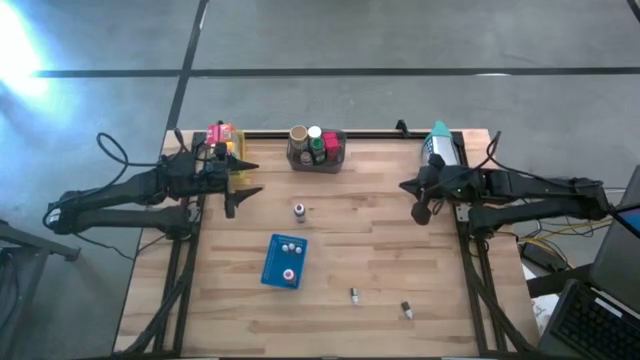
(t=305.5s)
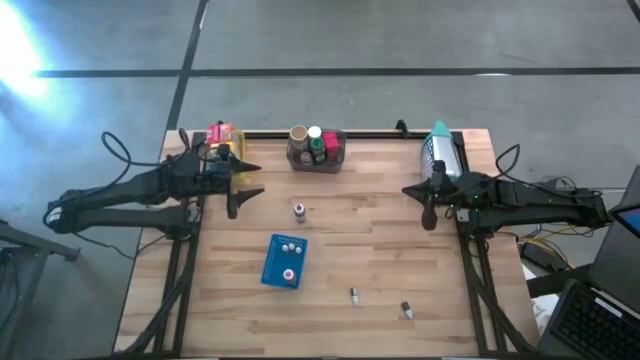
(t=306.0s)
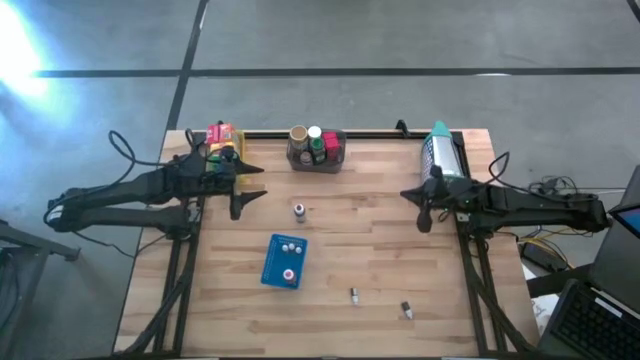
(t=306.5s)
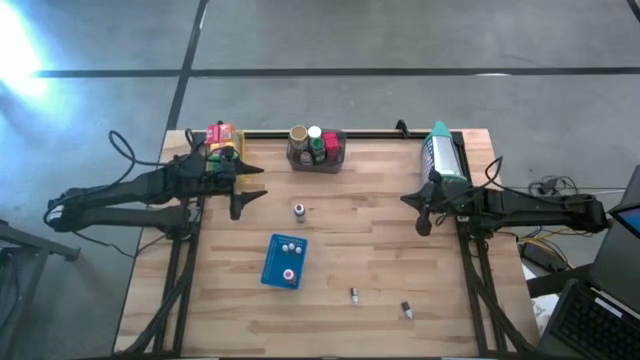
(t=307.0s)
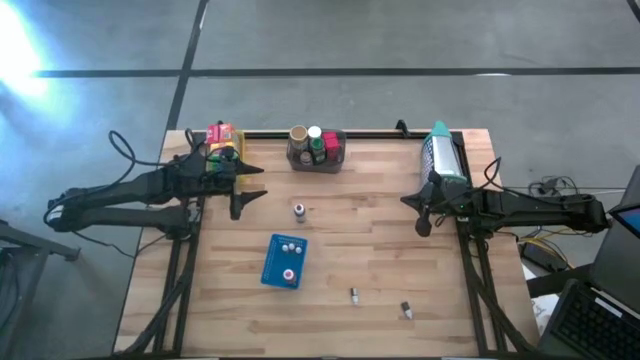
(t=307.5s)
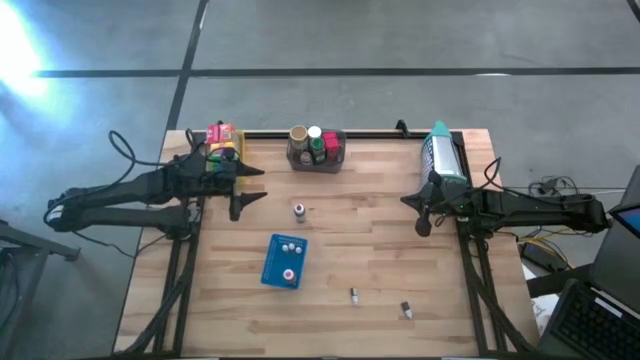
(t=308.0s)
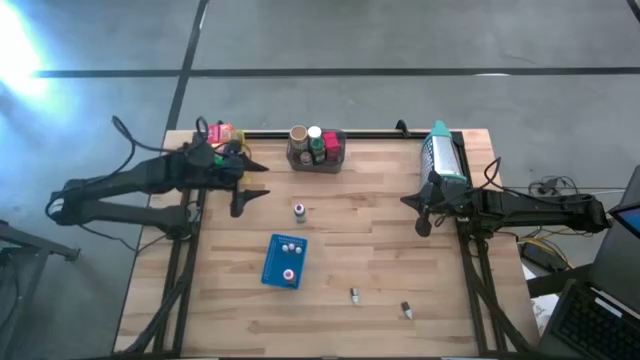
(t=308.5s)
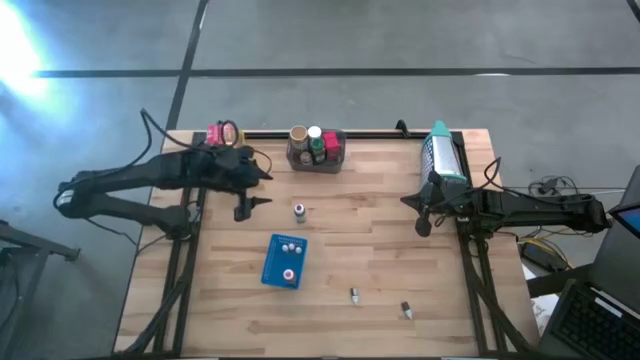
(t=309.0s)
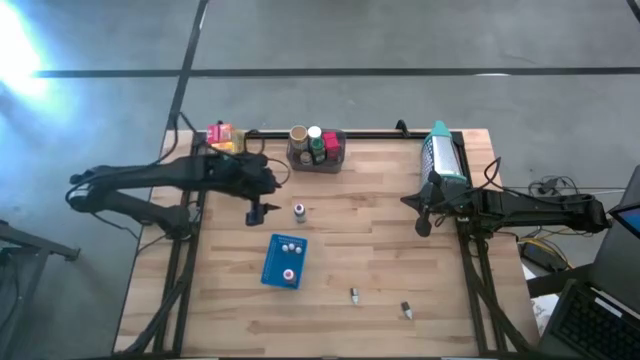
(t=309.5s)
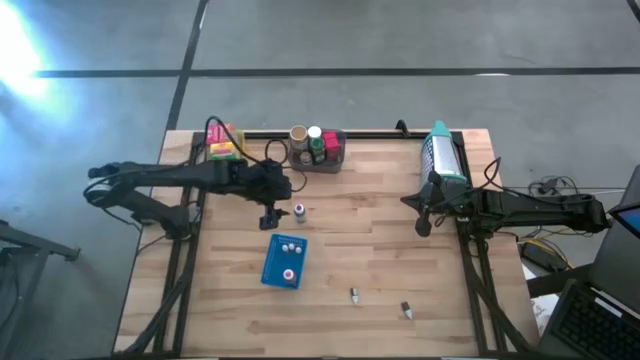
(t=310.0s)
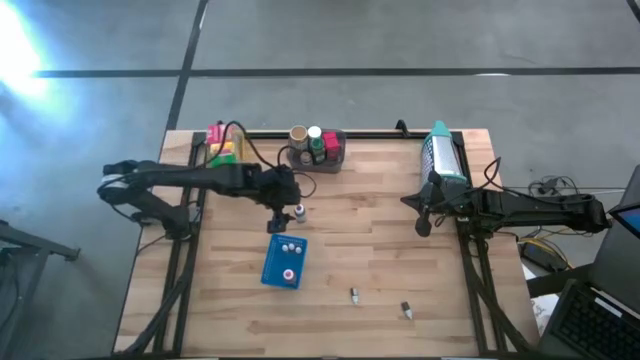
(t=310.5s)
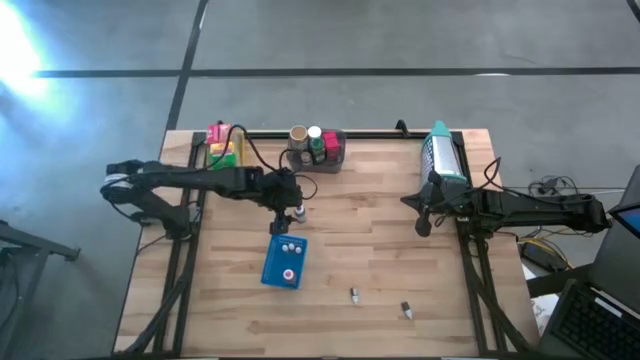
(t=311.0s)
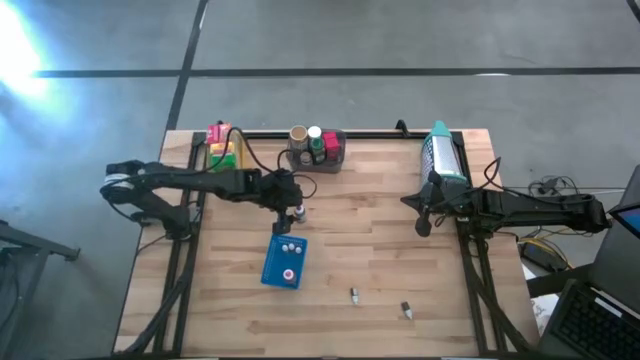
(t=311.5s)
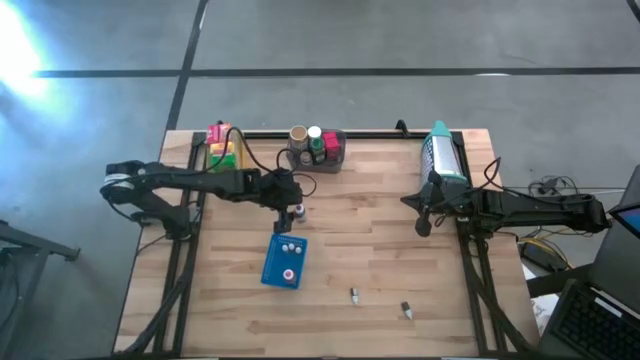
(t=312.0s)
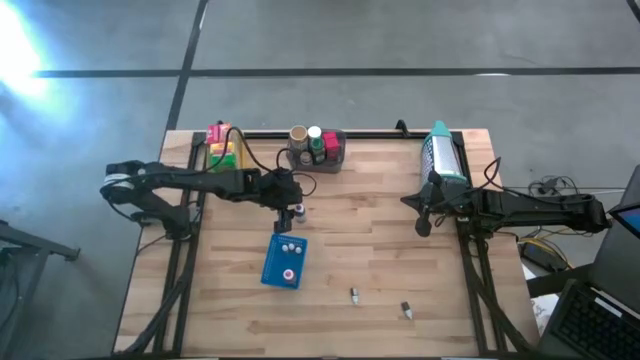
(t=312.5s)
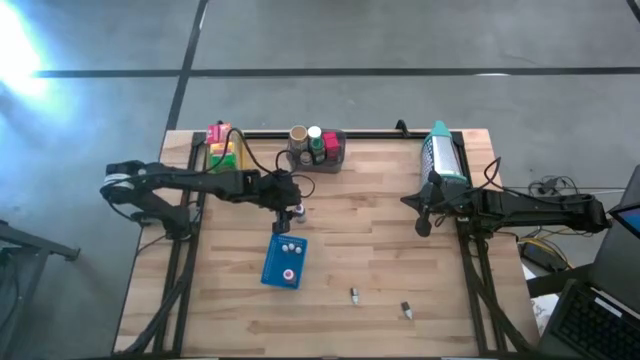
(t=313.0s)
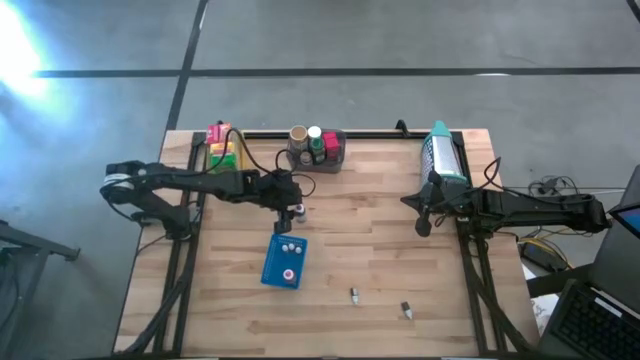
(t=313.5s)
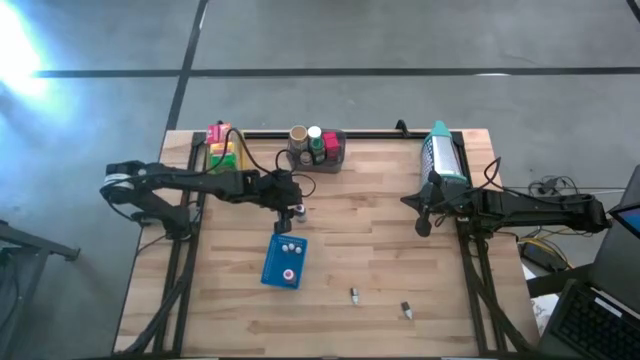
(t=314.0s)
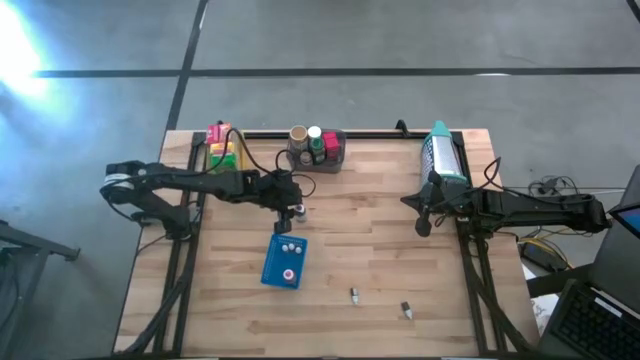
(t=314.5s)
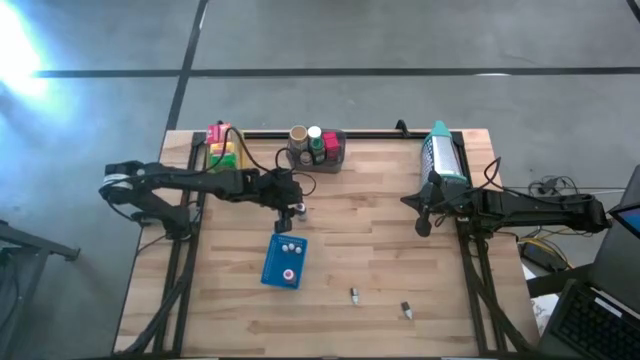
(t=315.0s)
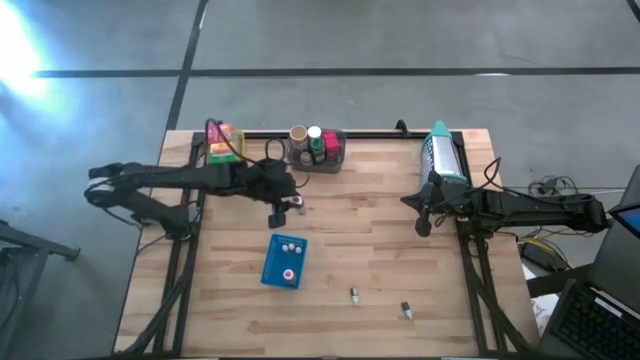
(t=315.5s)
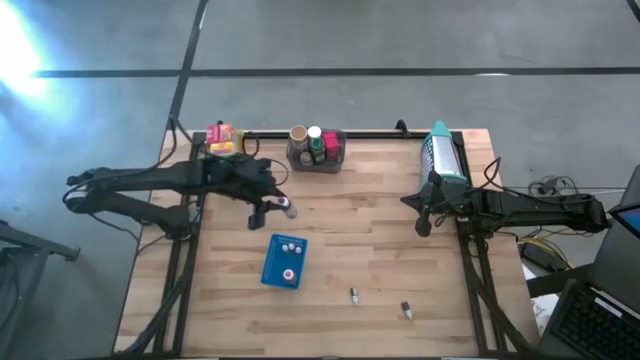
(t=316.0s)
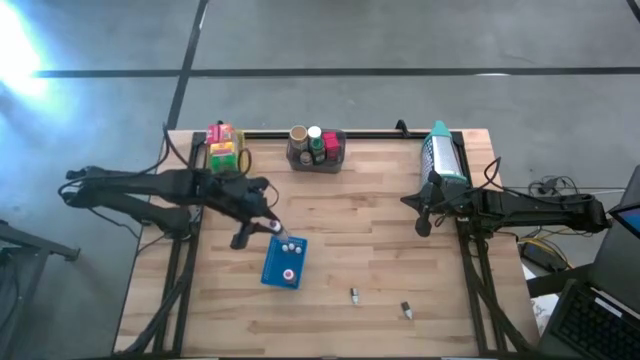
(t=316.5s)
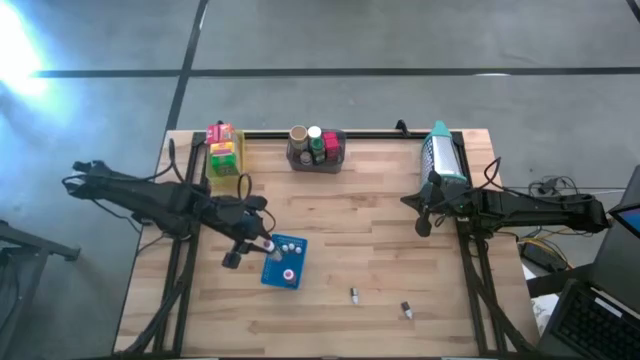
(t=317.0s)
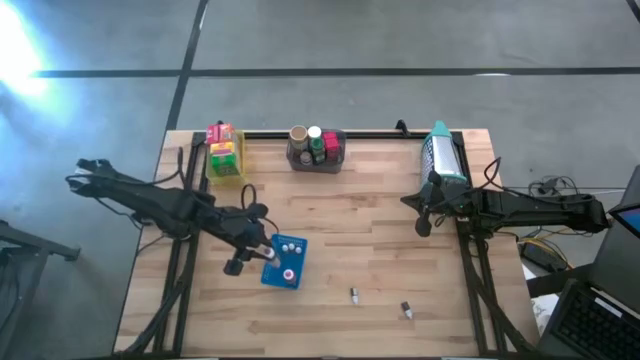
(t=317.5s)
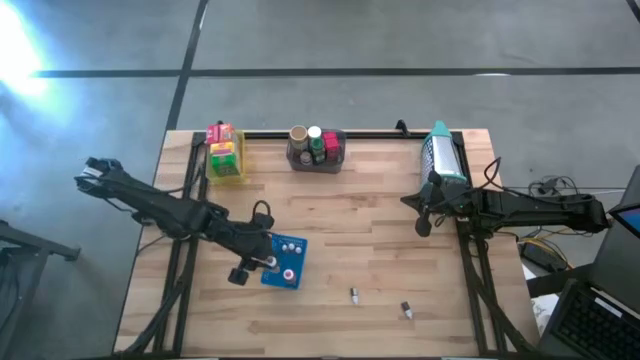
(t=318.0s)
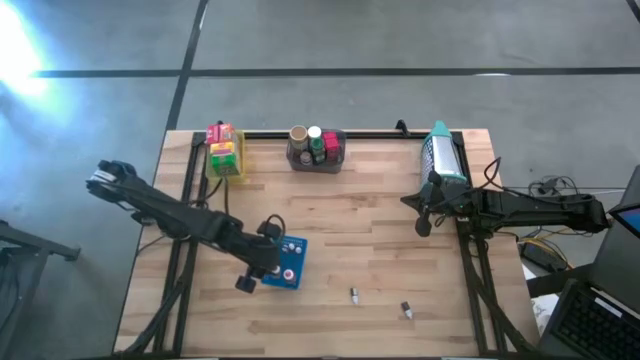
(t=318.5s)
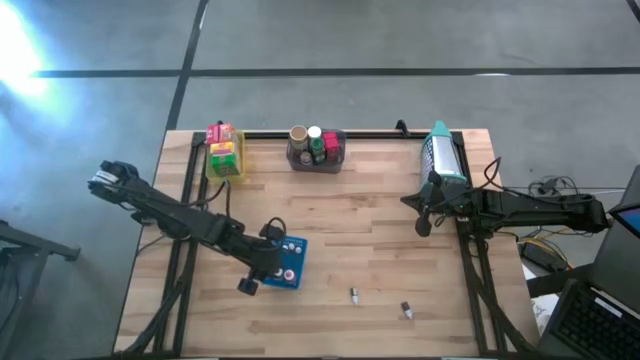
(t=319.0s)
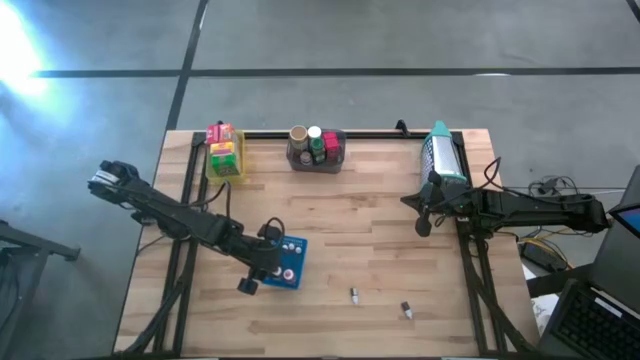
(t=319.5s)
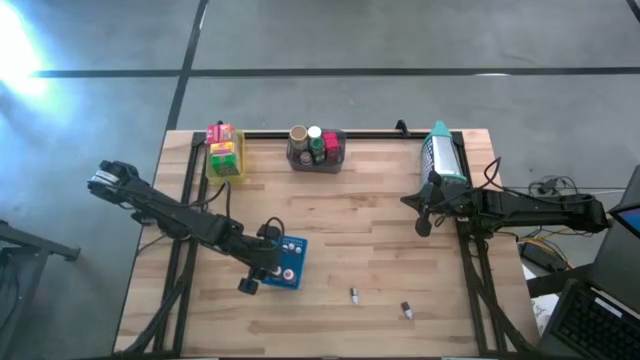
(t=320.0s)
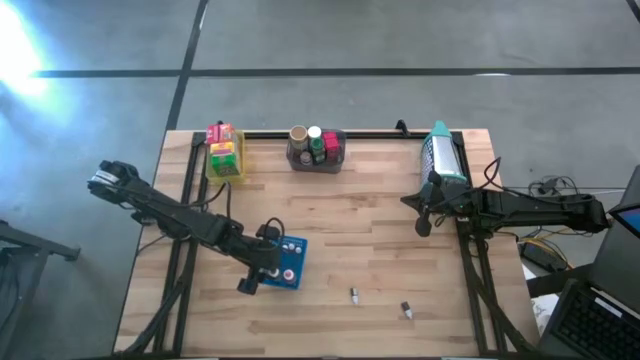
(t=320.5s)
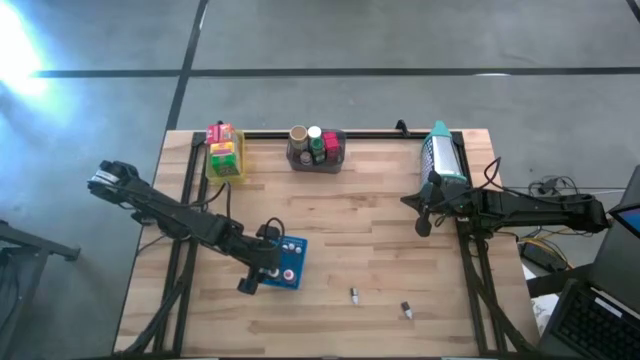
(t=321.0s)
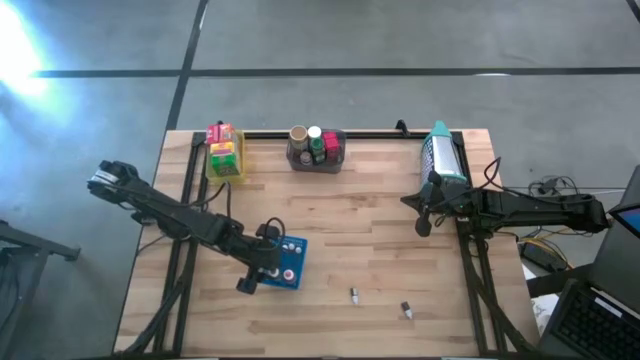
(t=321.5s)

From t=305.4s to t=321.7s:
Task: Pick & Place Kitchen Items
Put the large purple food coloring bottle into the blue bin

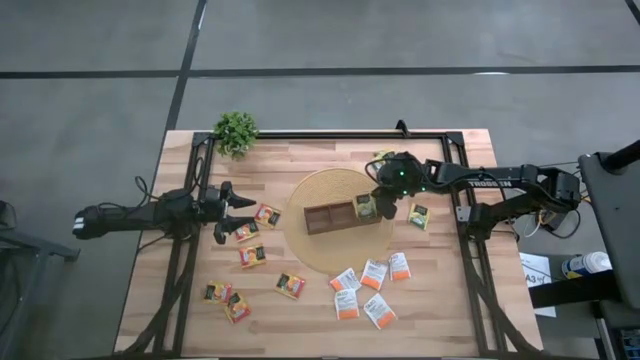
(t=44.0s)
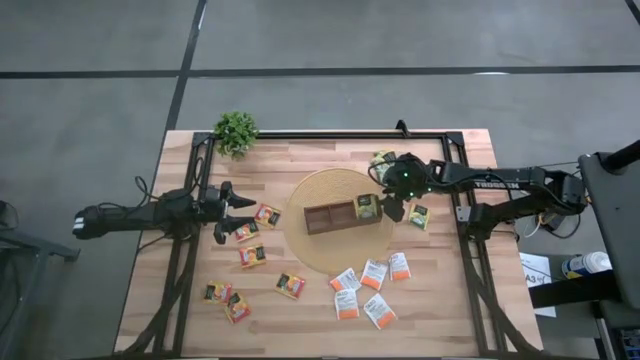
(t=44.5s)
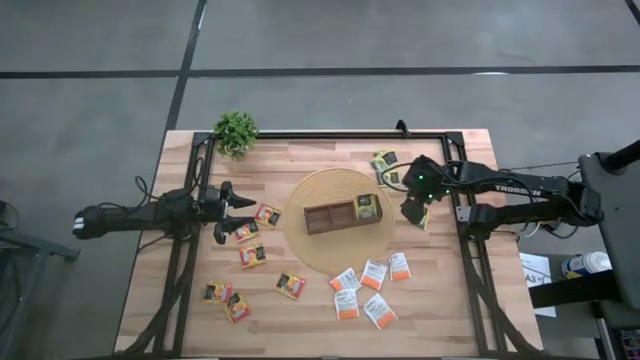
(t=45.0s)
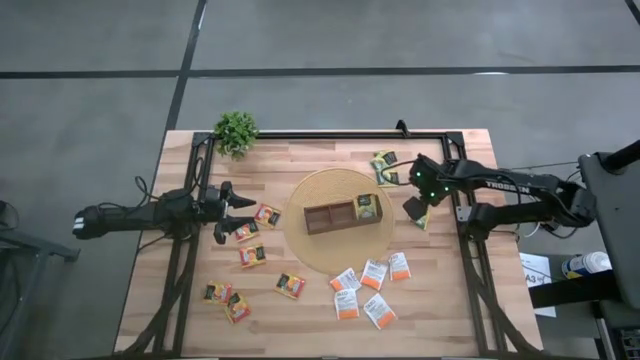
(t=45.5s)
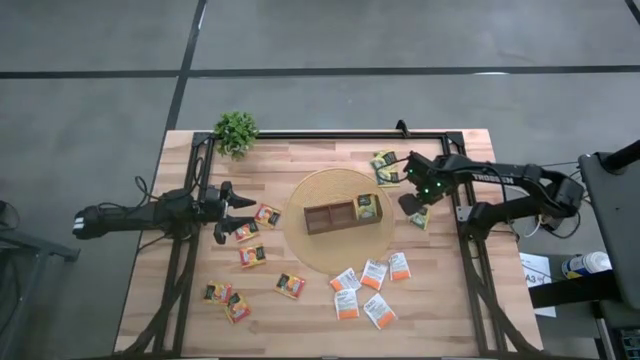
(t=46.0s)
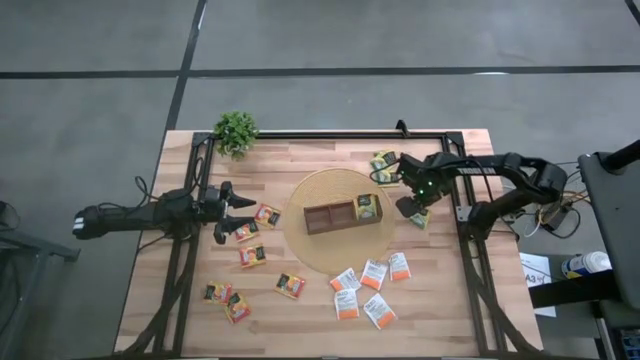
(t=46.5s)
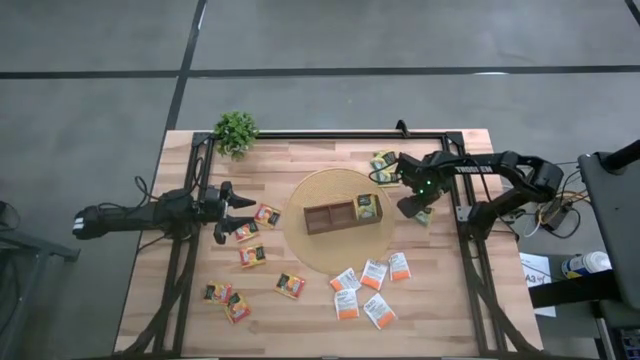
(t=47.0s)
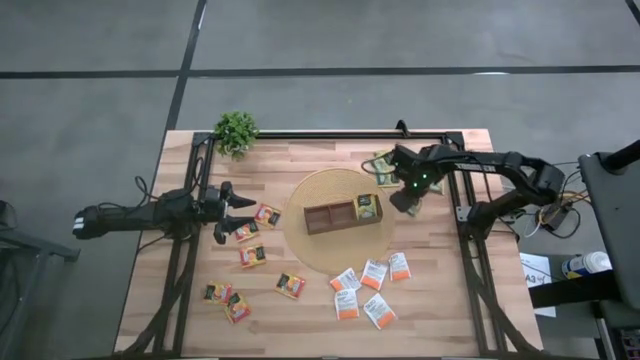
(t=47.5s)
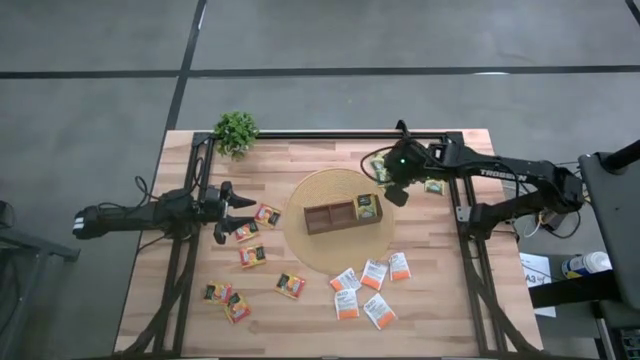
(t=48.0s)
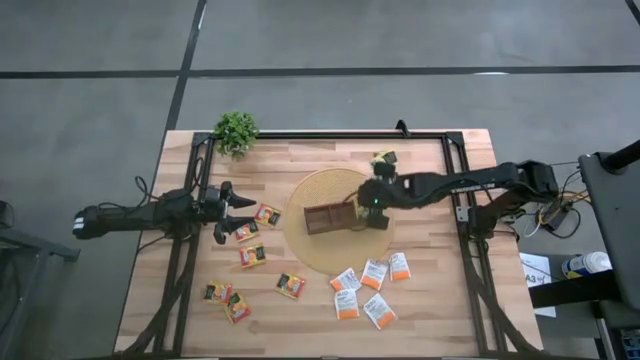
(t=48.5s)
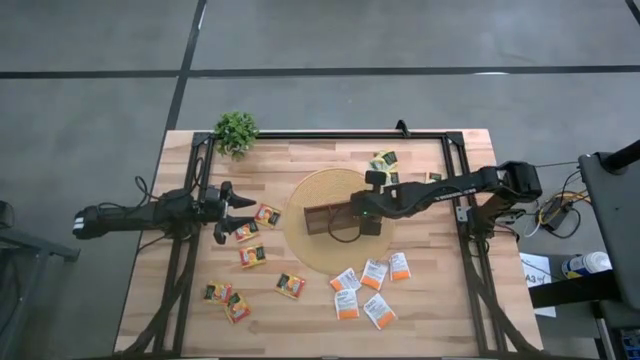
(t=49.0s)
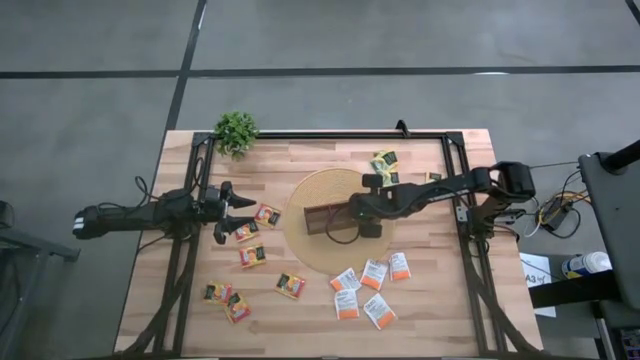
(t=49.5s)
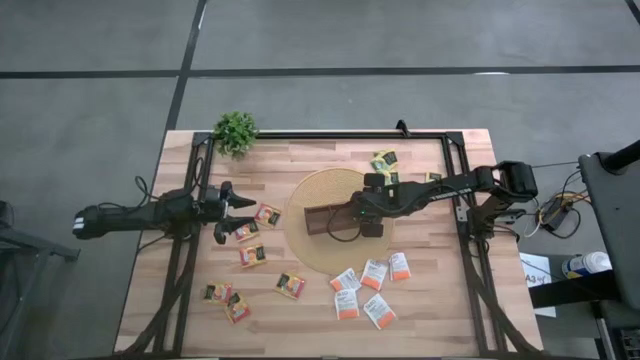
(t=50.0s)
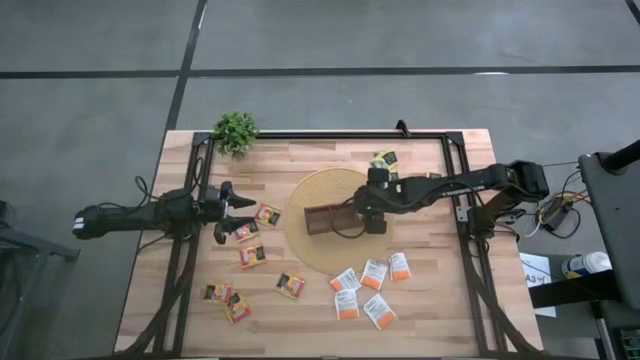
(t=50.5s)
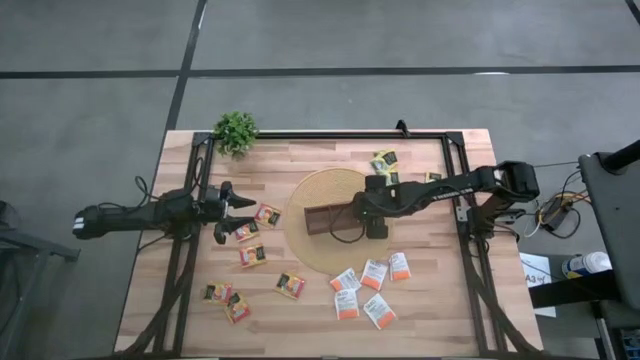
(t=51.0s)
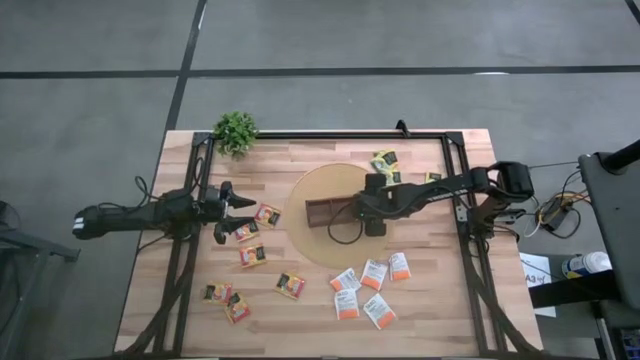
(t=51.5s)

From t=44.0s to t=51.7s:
Task: Pick & Place Tea
Put the yellow tea bag into the right section of the wooden organizer
